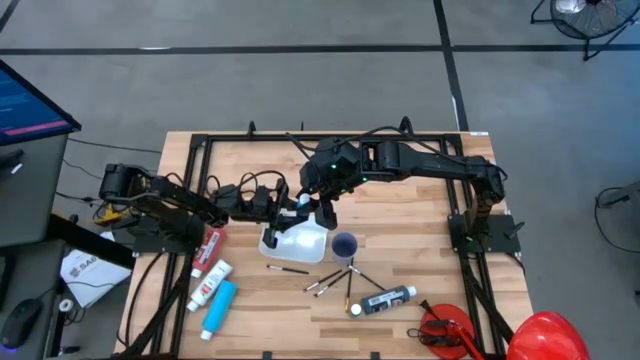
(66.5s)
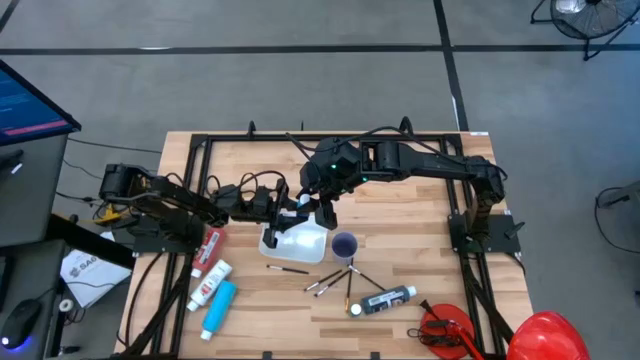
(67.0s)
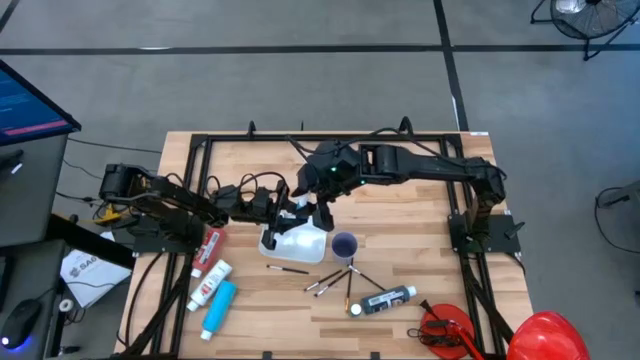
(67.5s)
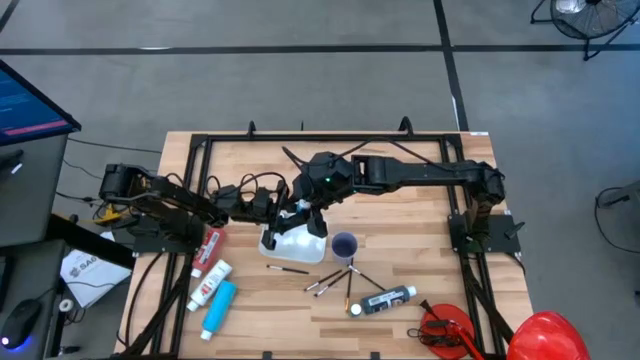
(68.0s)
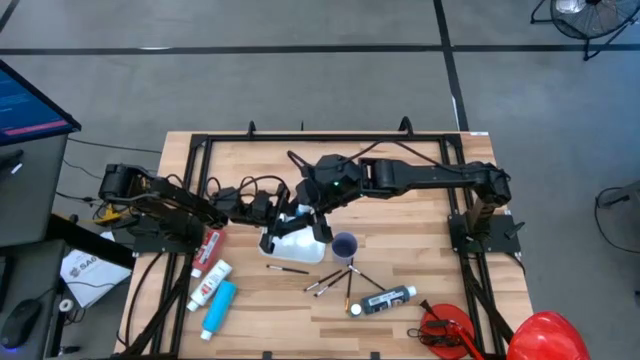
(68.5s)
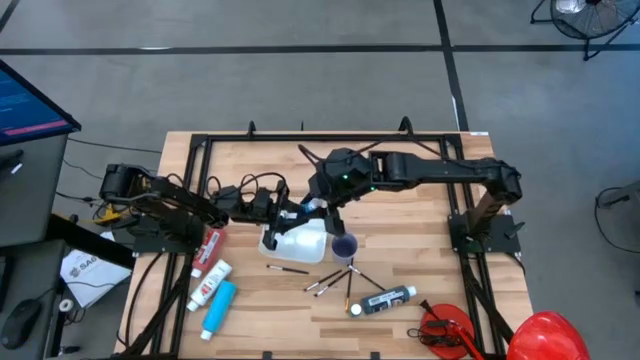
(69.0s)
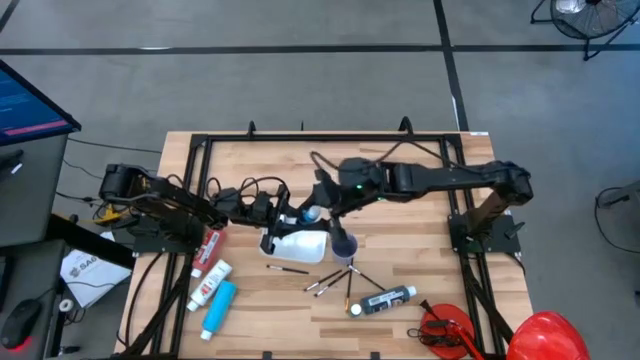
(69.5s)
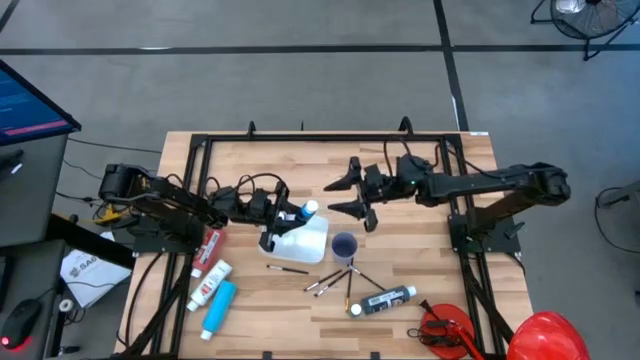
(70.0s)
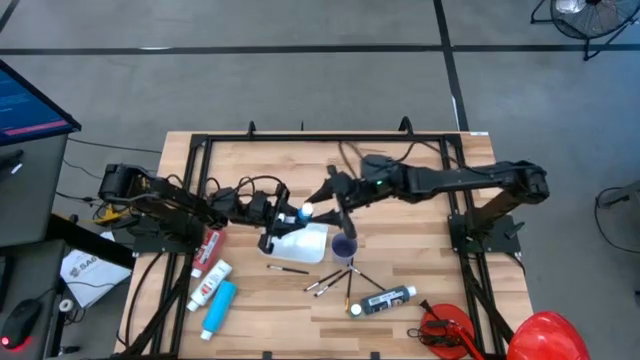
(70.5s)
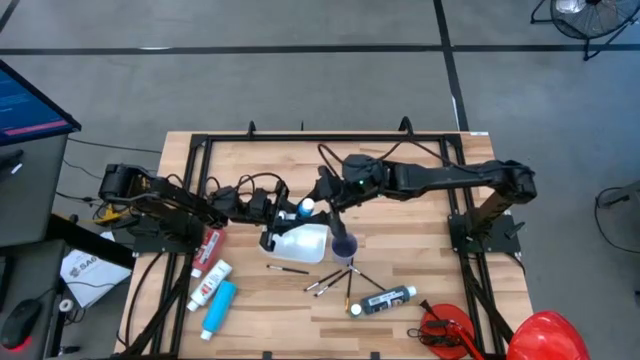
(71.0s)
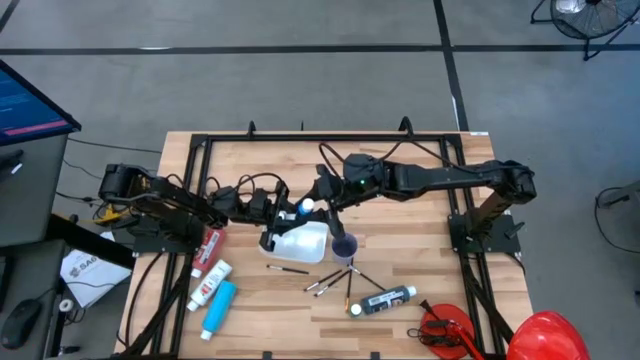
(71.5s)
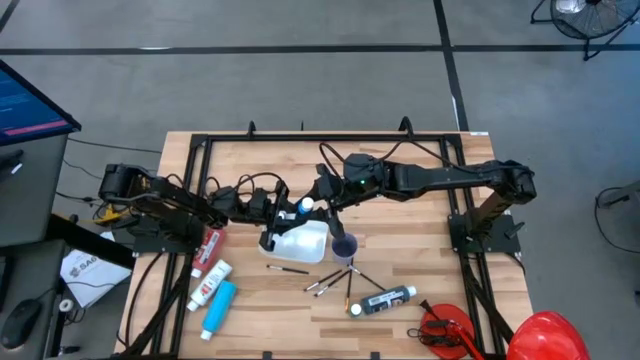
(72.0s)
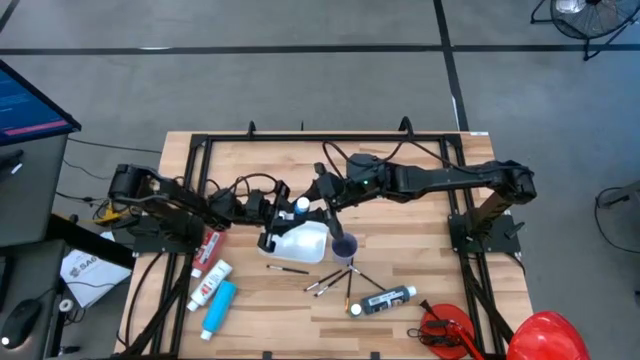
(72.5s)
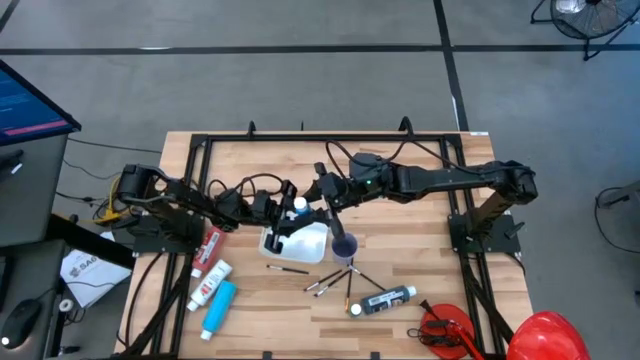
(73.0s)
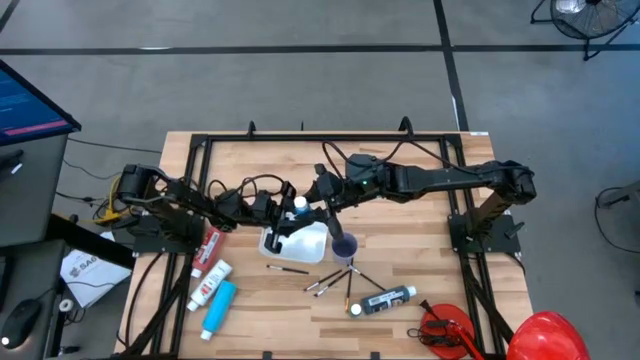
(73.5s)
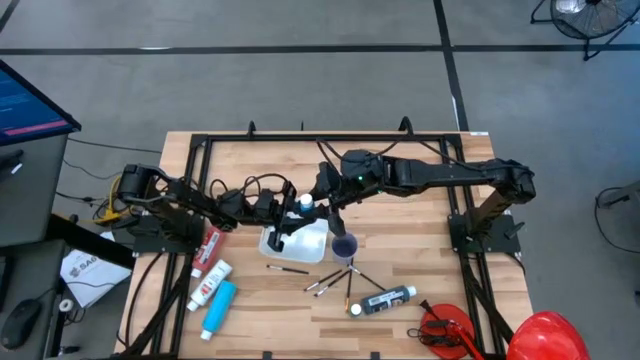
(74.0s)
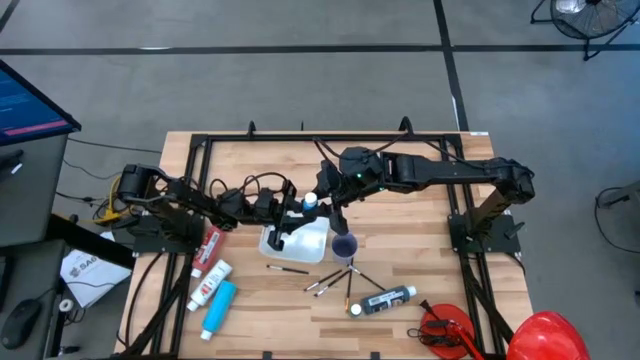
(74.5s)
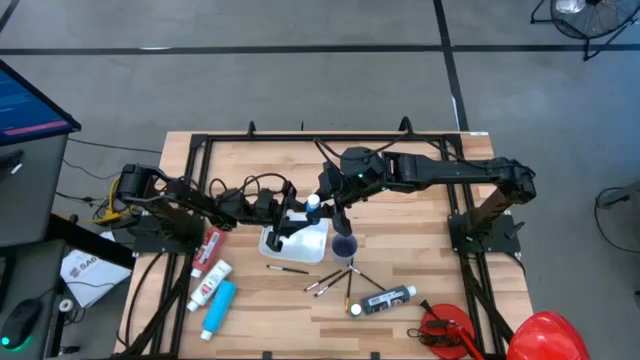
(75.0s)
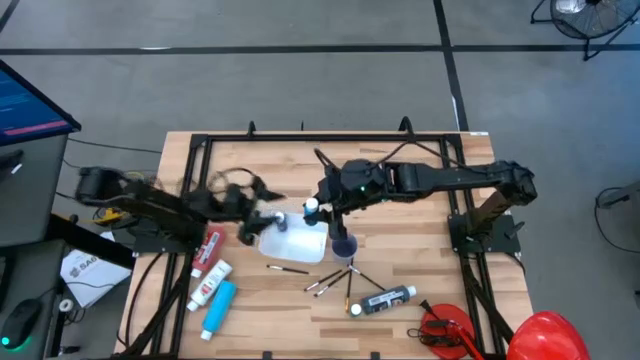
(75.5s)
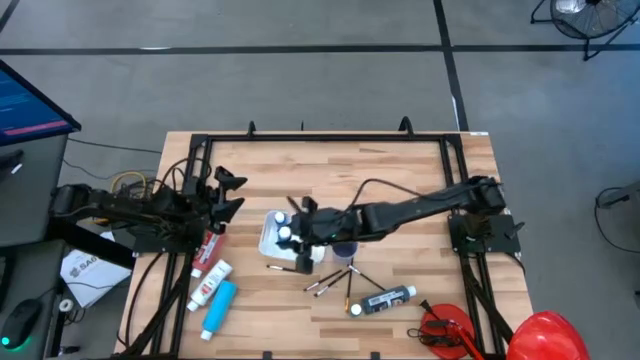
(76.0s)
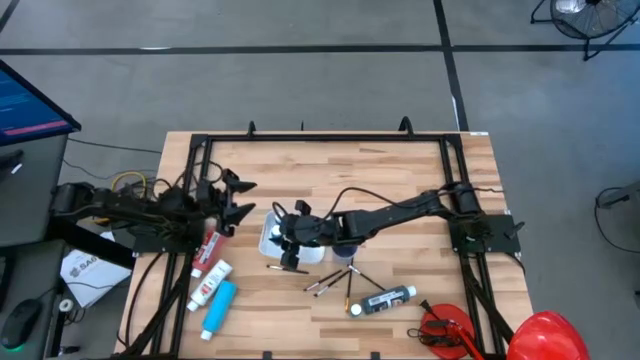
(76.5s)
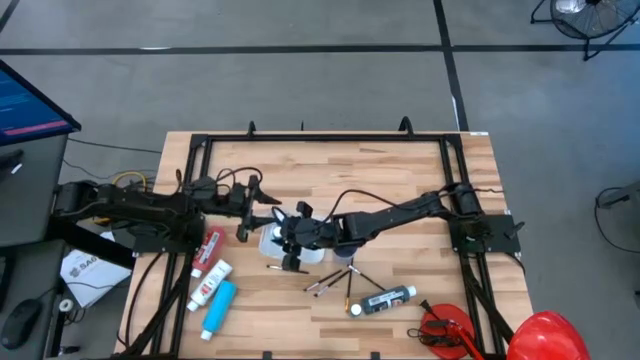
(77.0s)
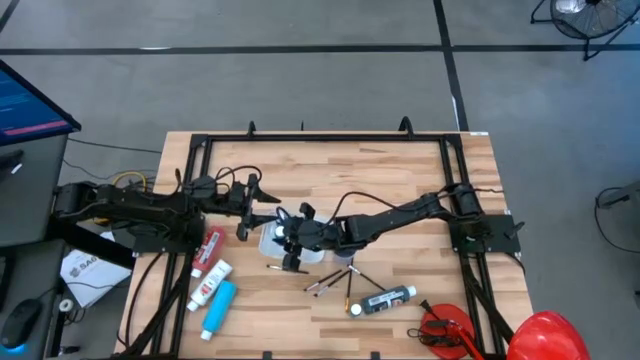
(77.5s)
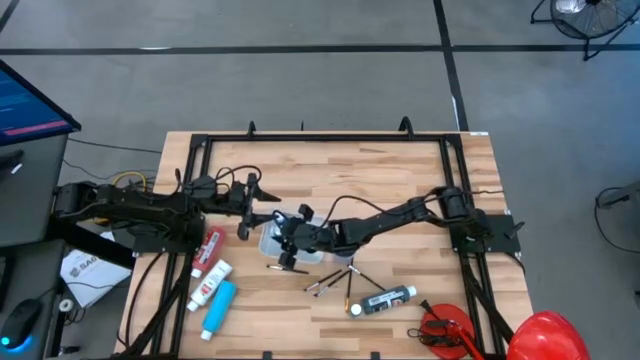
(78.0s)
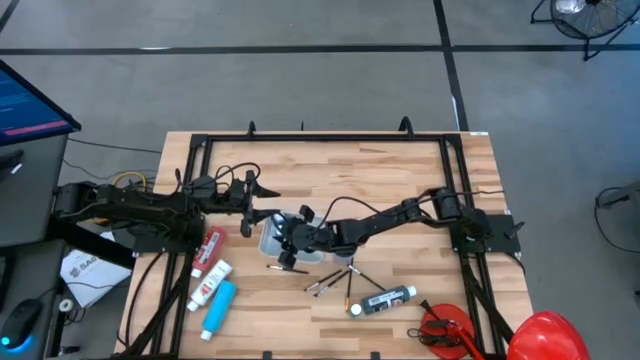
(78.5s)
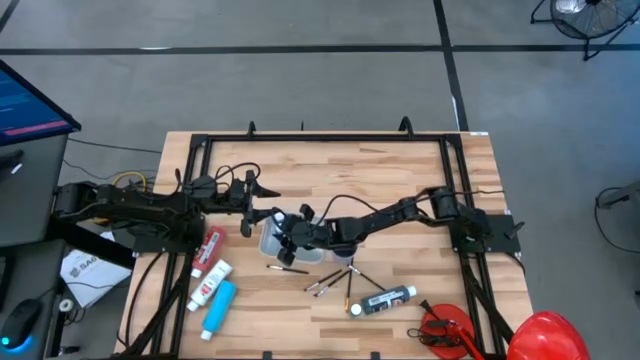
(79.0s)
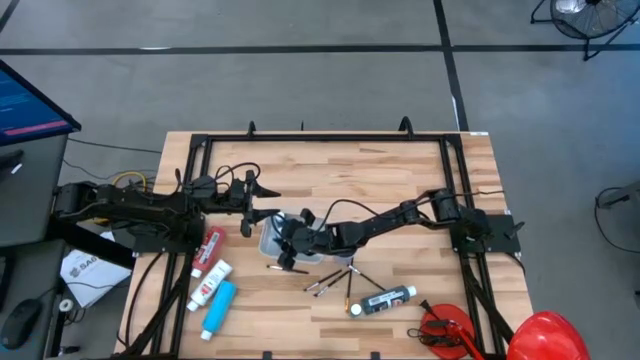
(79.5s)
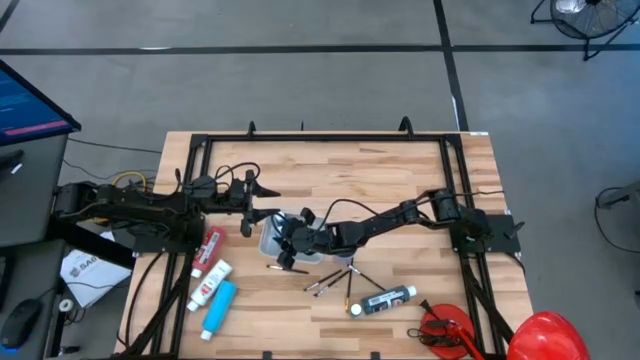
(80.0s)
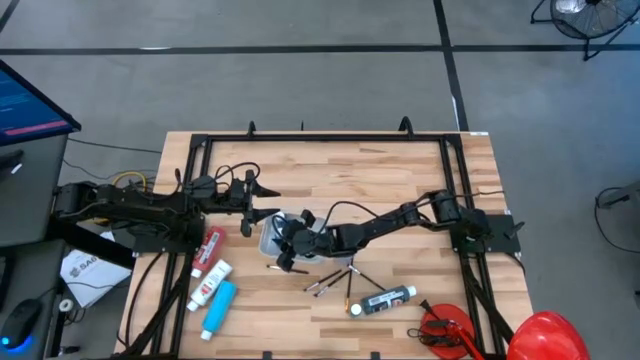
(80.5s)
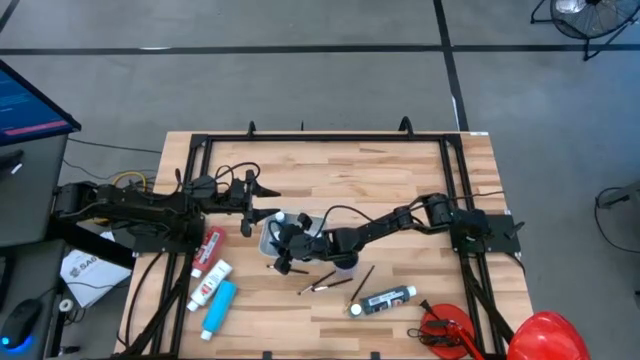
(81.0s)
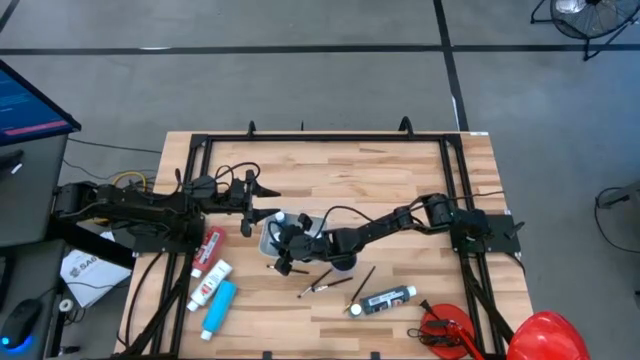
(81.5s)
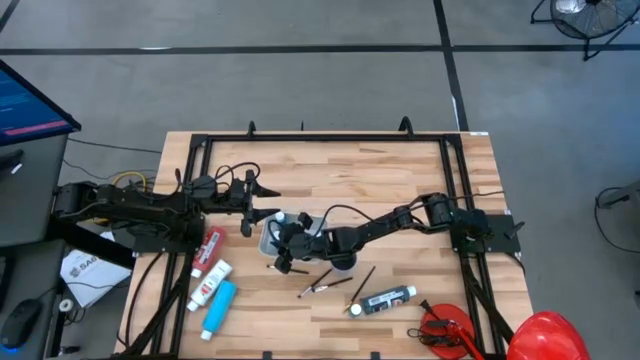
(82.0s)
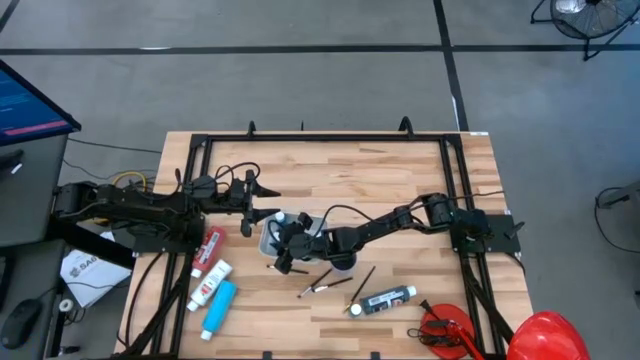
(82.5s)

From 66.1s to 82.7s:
Task: Pick & Place Paint Supplies
Put the blue paint bottle into the white bin

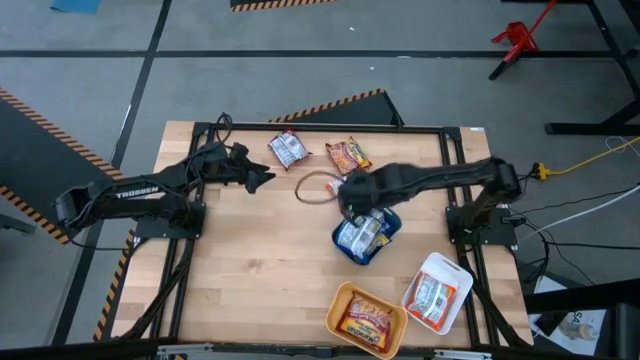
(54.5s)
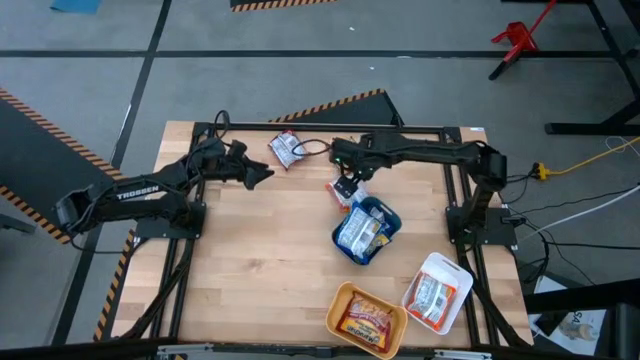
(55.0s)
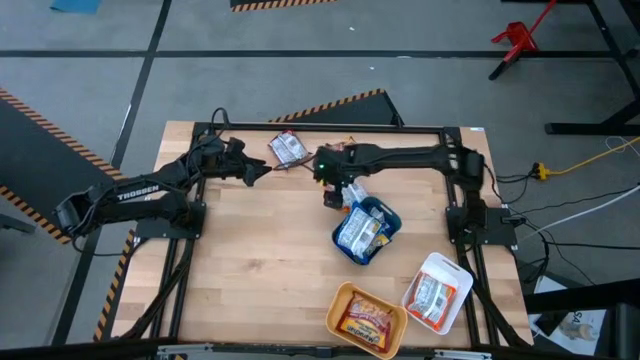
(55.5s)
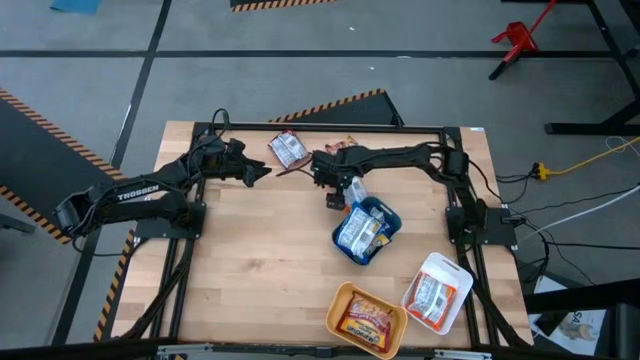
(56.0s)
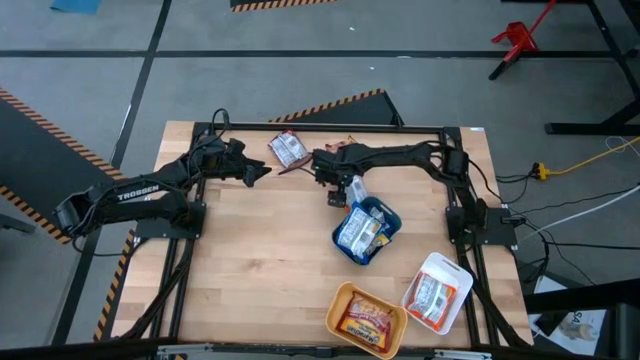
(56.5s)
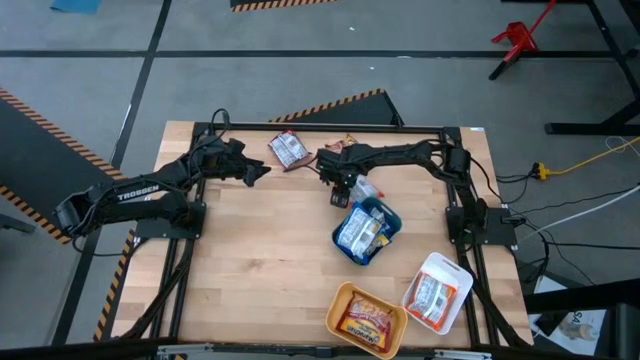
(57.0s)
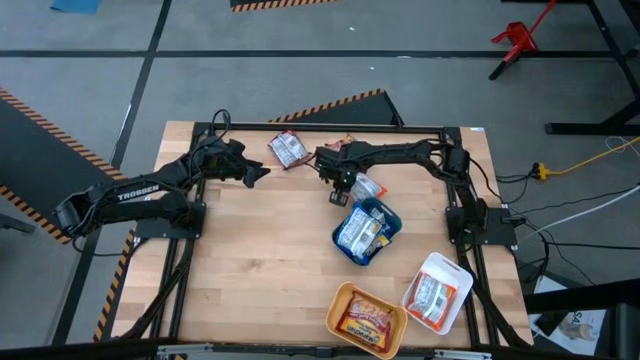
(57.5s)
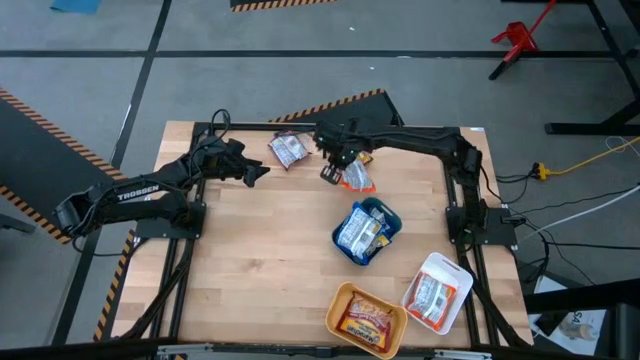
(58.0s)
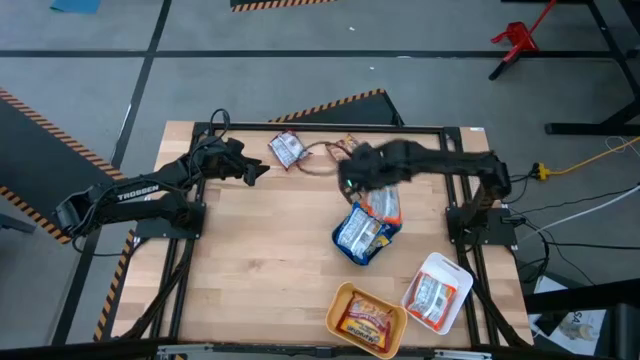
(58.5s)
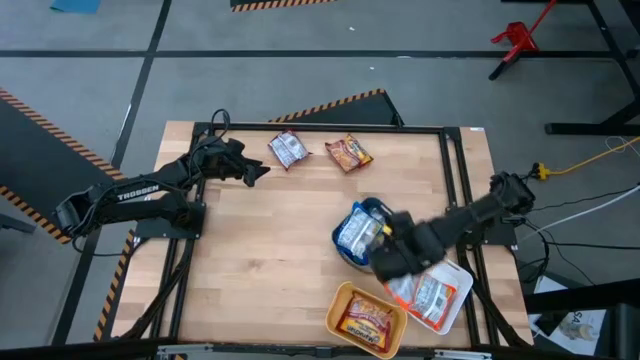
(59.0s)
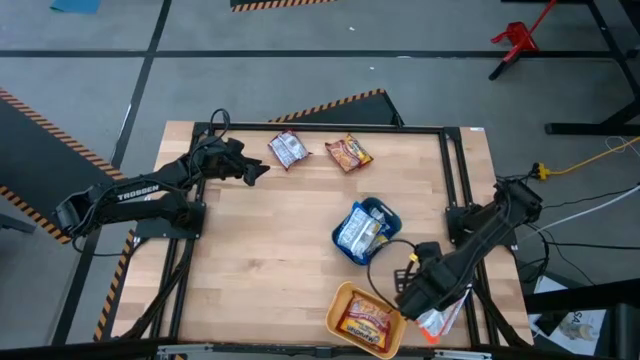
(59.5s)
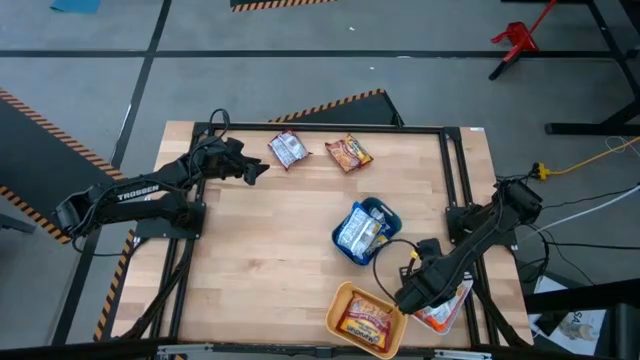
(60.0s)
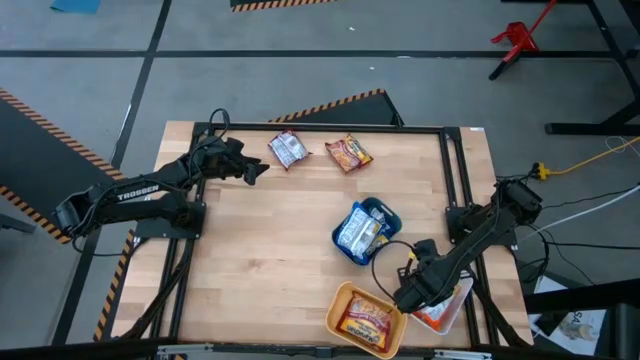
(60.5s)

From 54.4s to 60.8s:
Task: Sort Maruchan noodles
Put the orange noodle pack into the white bin
